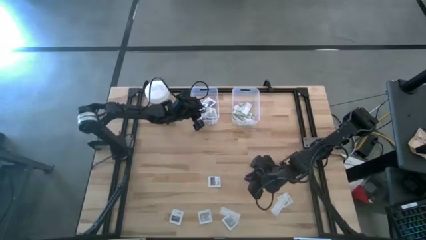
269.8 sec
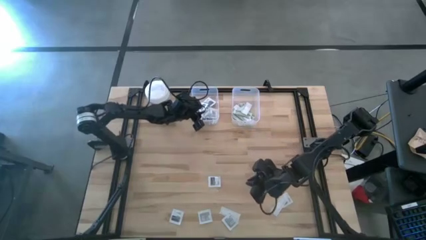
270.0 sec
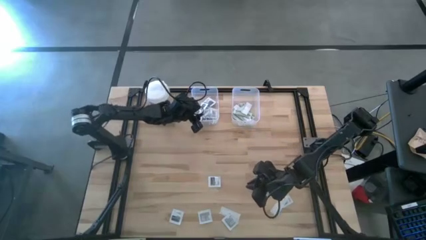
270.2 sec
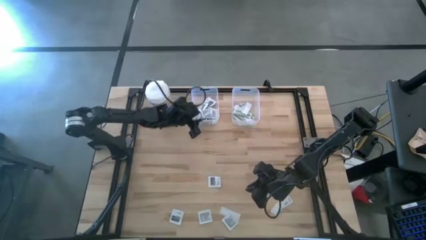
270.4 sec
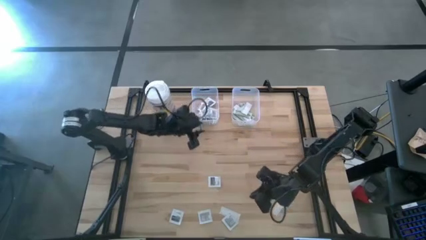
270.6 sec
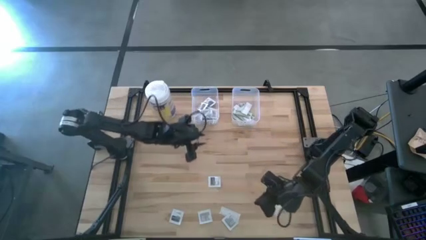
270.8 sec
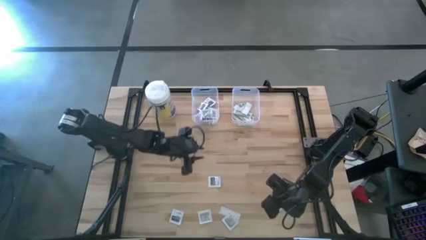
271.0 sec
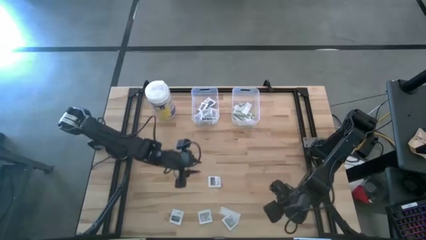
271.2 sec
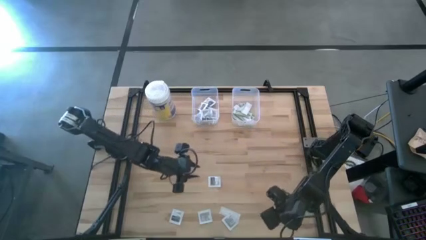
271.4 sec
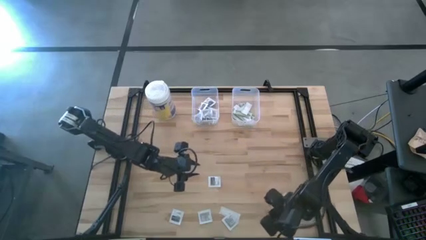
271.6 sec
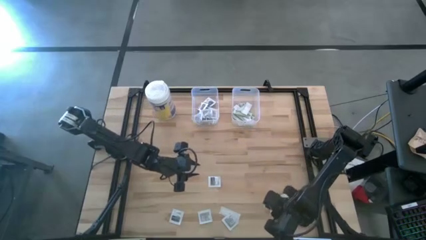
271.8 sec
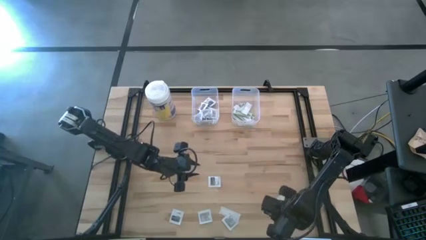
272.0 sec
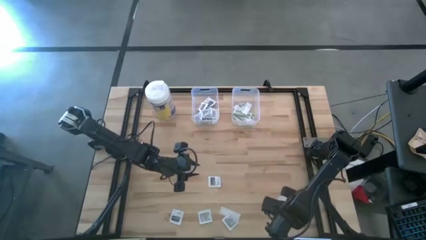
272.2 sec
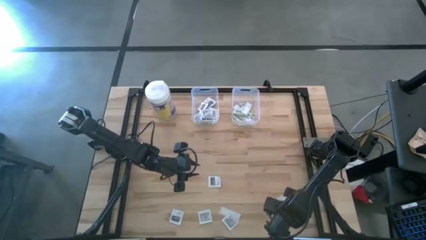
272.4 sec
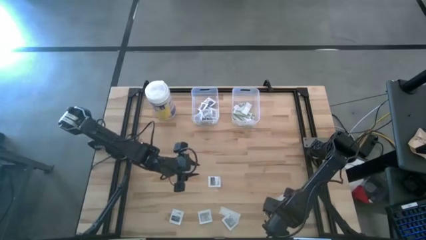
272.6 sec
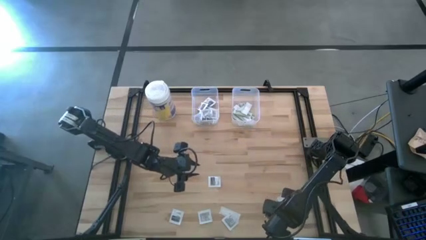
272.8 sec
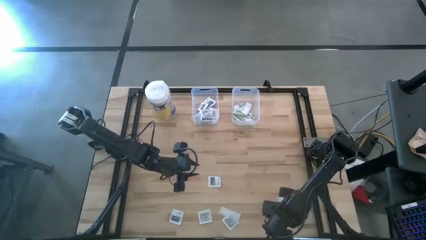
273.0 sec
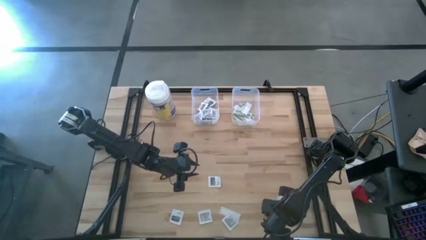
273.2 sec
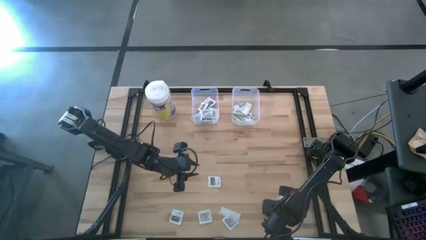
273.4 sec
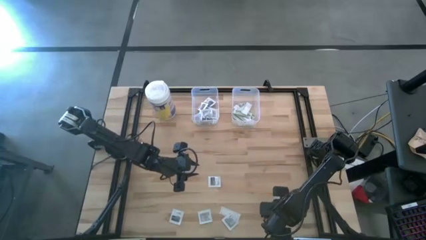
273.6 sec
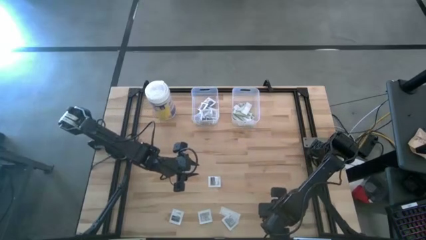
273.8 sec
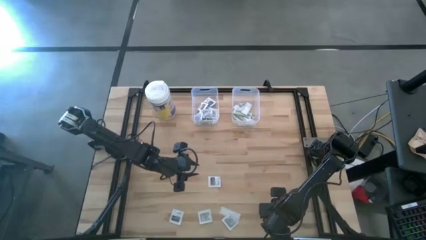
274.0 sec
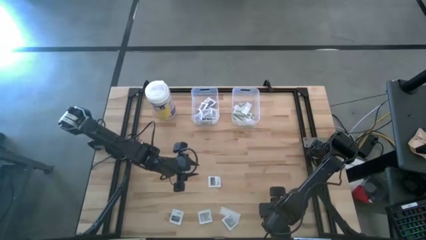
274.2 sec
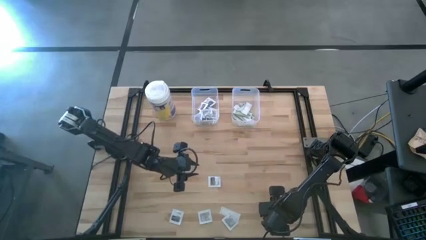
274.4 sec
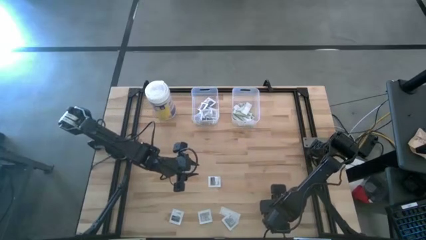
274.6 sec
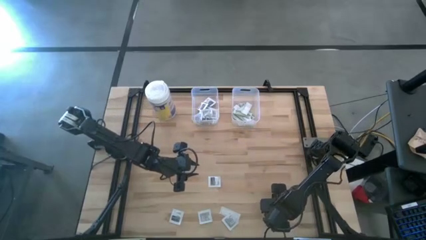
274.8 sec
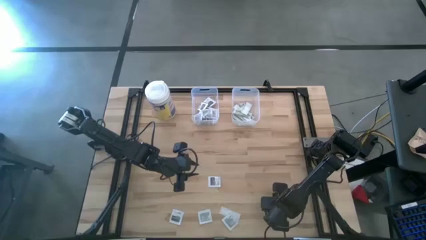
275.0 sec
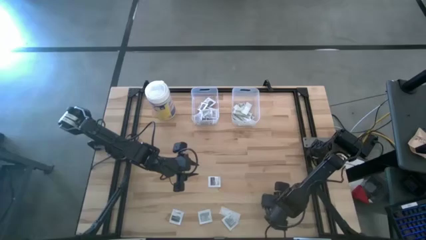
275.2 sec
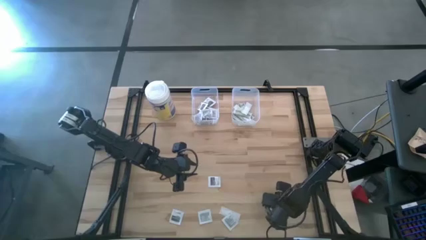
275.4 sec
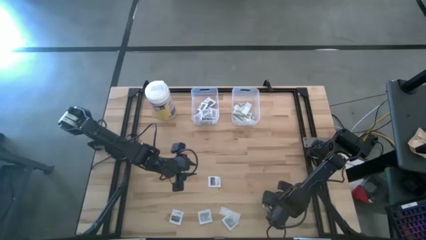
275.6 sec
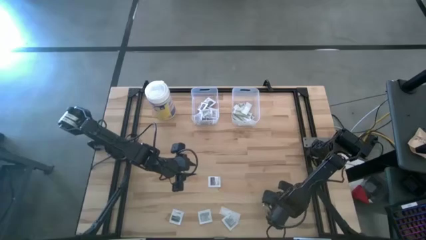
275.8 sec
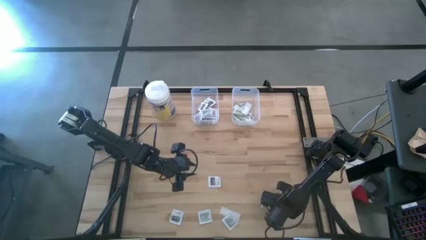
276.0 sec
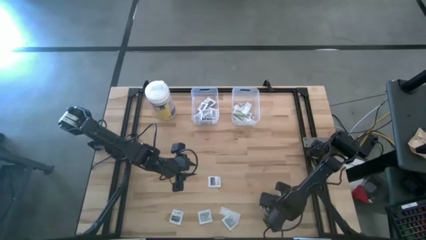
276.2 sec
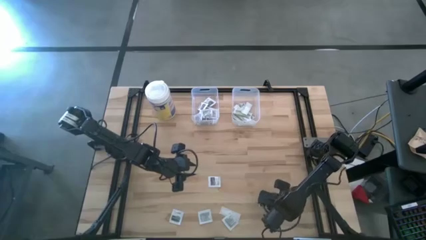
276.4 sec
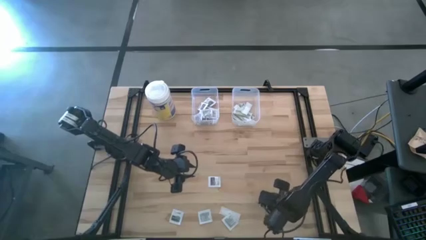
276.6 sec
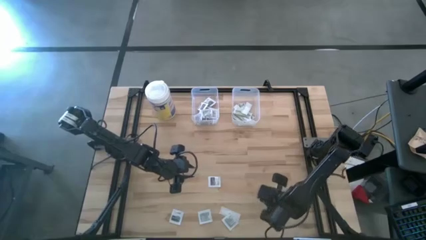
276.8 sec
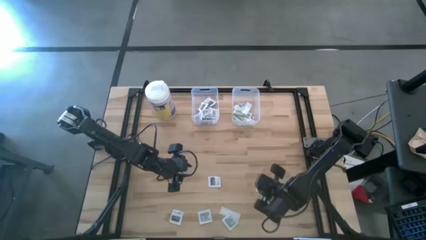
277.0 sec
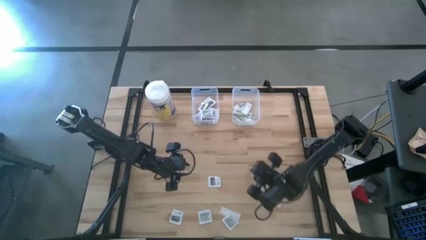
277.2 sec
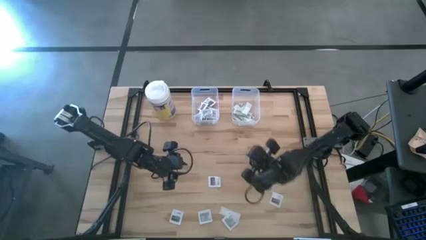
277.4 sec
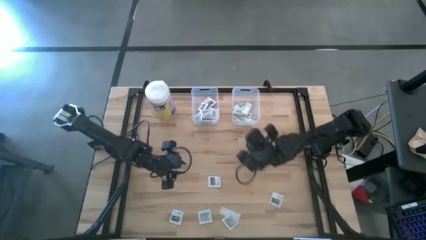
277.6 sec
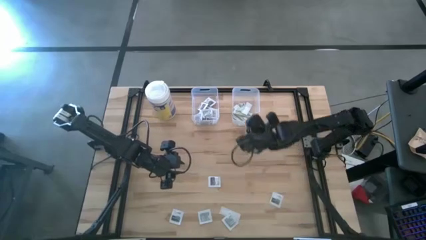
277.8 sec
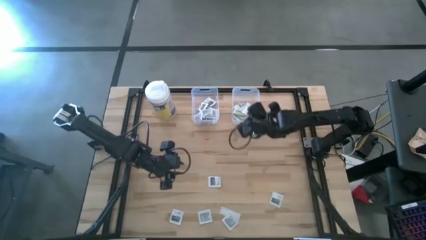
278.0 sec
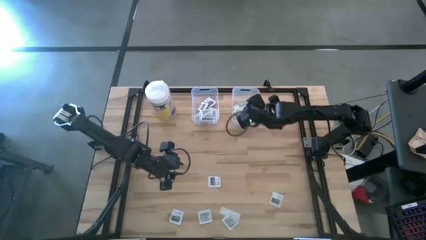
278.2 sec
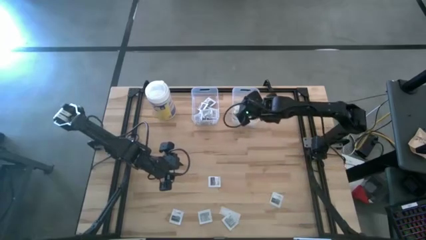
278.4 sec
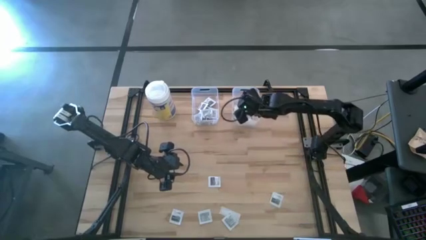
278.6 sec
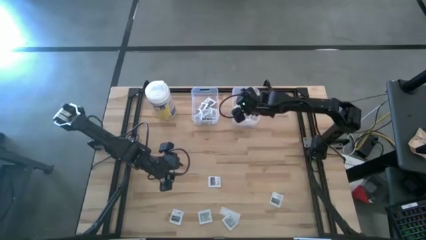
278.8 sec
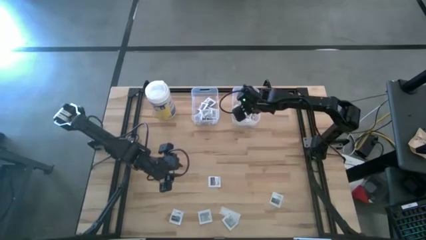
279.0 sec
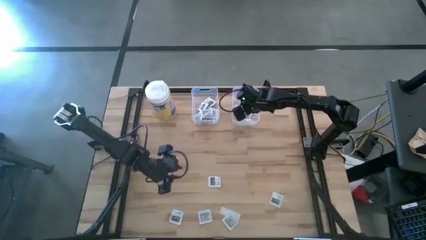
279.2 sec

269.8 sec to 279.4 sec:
Task: Pick & Place First Aid Supplies
Put the bandage into the right transparent bin

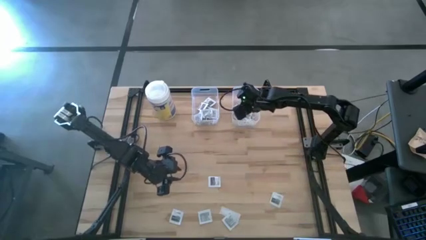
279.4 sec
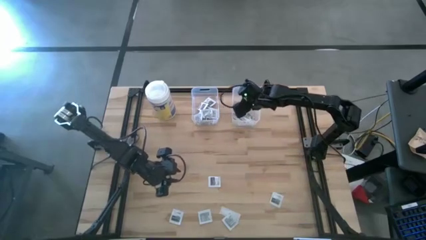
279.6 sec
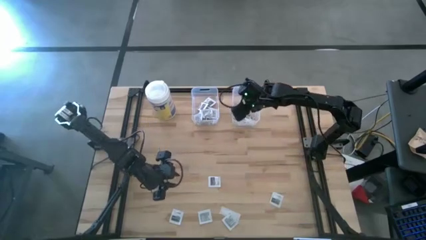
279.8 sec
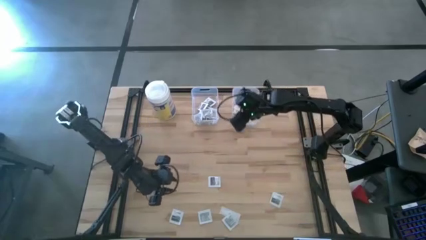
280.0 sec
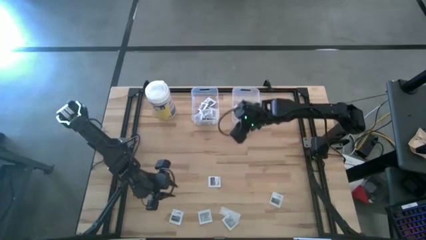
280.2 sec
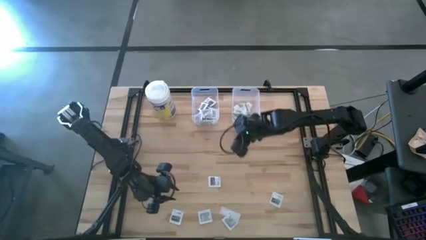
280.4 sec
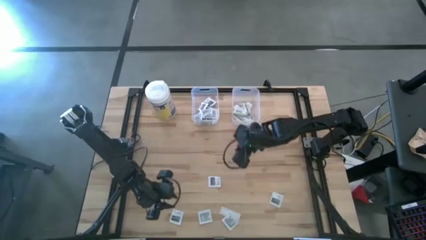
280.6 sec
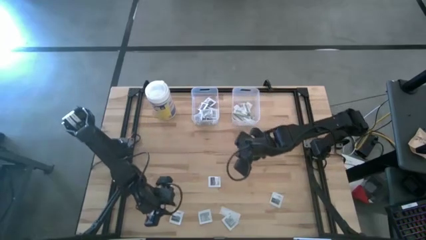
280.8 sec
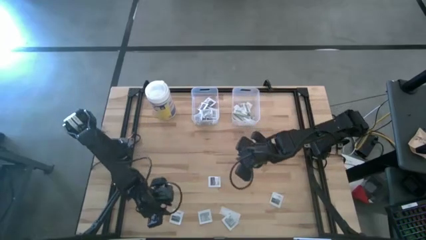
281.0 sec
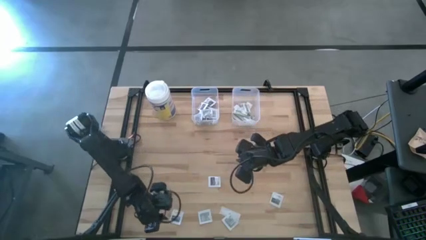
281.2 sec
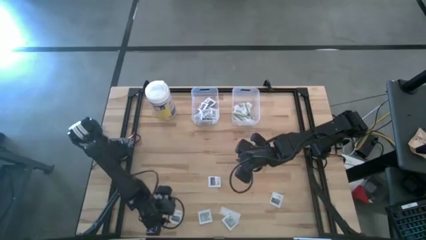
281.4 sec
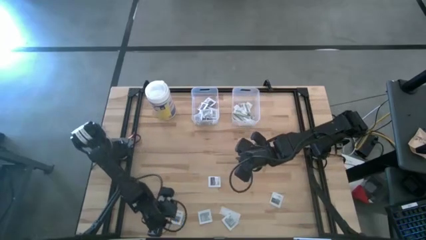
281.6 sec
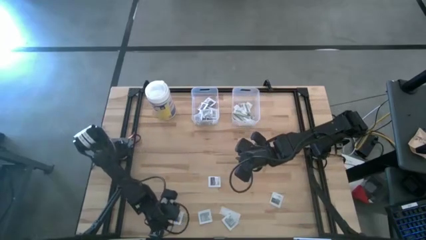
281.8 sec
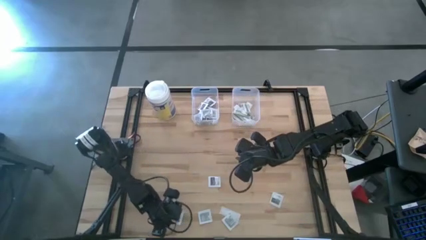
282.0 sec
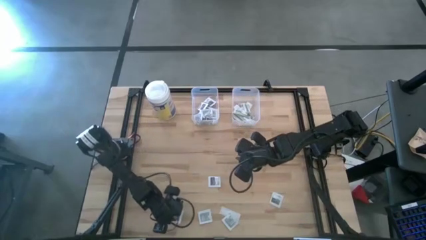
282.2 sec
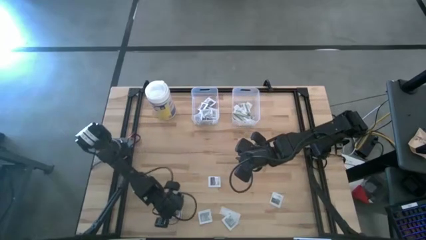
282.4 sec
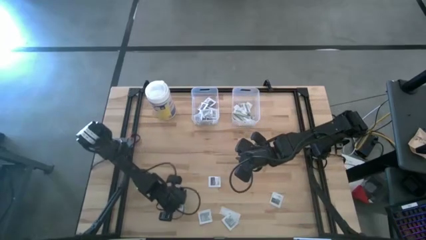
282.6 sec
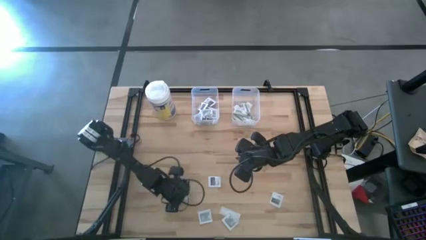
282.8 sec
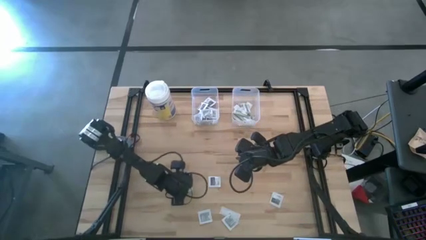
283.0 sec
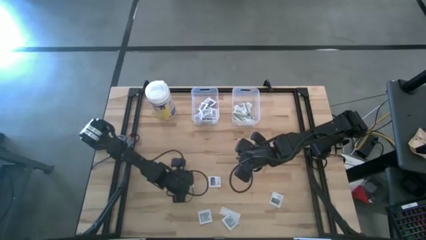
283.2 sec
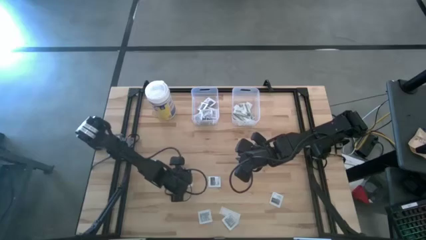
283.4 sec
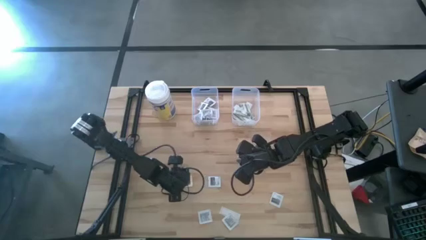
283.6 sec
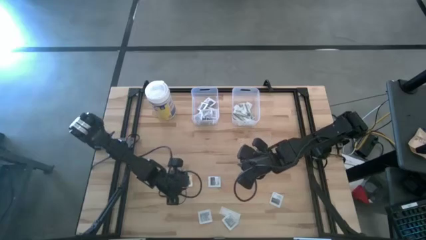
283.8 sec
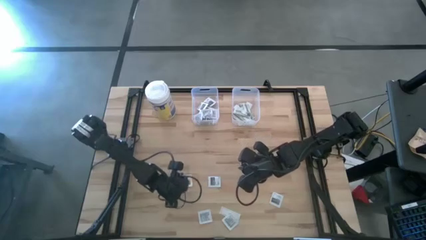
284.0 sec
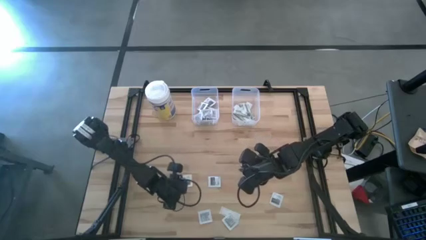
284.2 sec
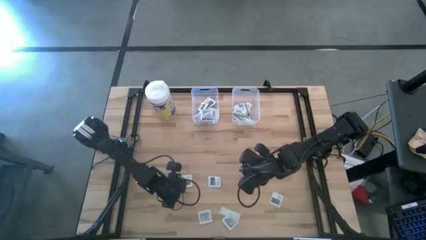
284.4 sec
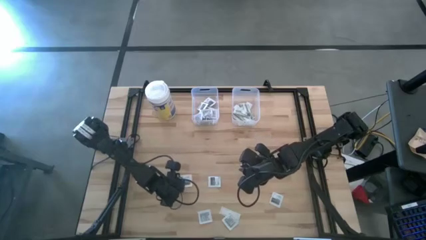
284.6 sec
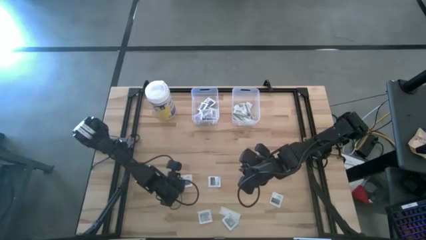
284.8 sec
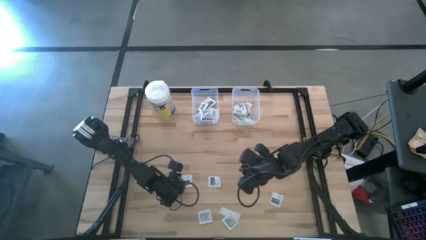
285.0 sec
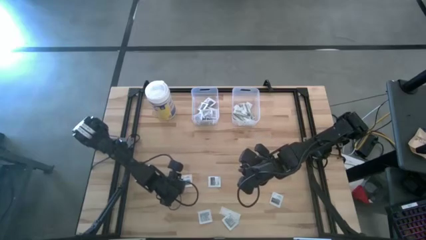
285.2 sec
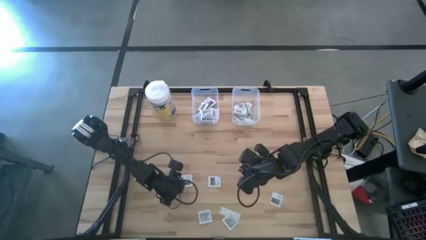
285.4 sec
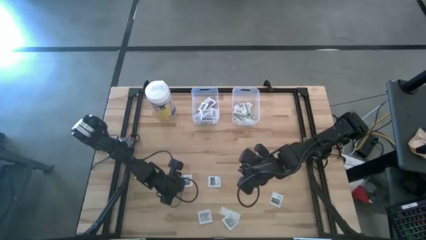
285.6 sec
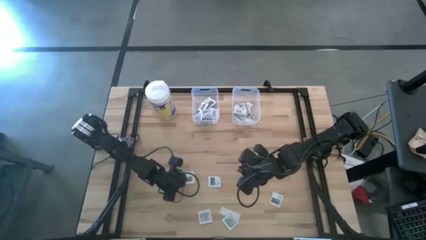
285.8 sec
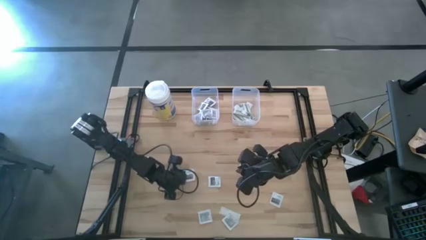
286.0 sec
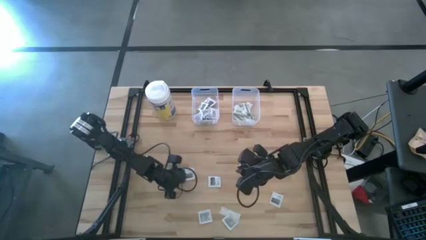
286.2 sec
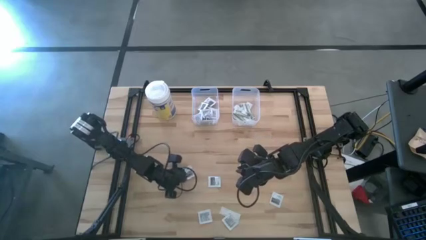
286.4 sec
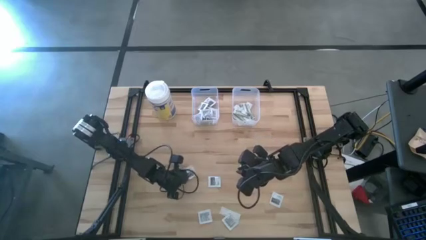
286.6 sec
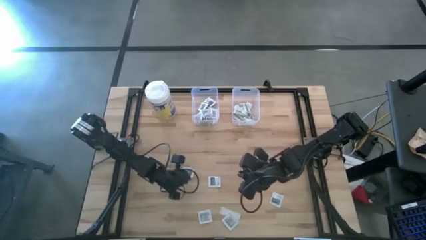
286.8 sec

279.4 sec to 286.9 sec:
Put the towelette pack into the left transparent bin
